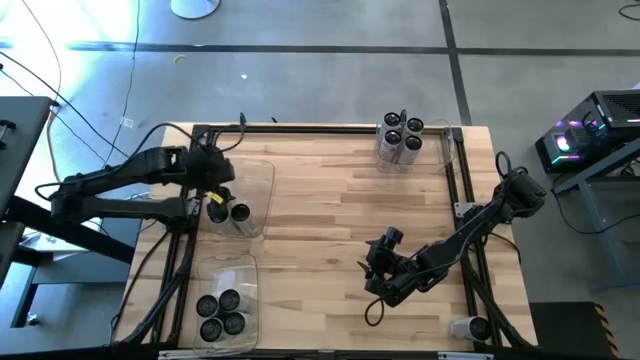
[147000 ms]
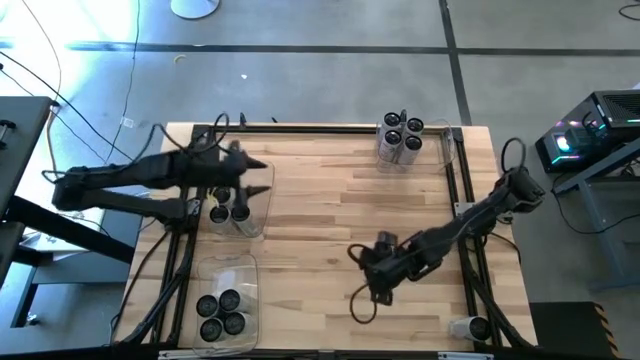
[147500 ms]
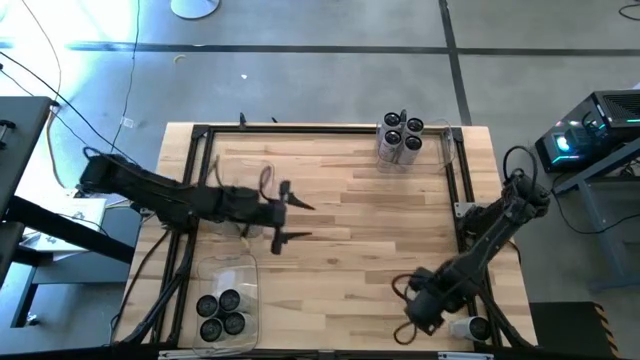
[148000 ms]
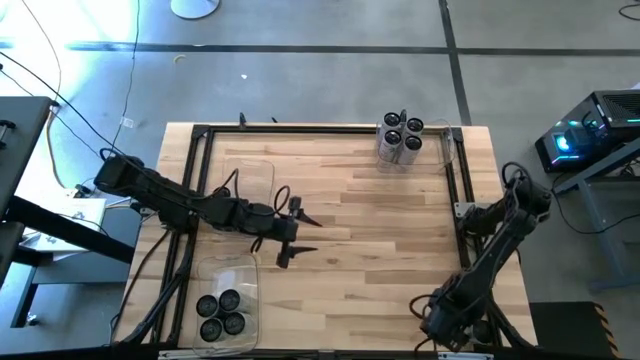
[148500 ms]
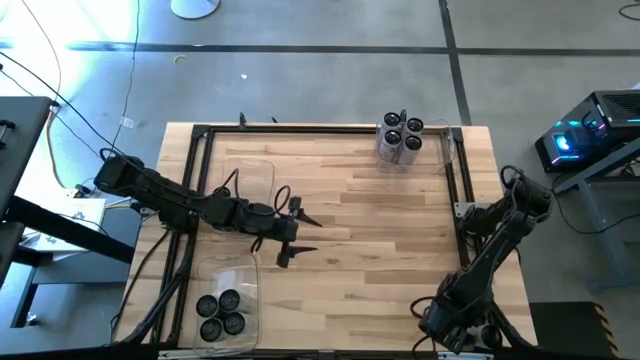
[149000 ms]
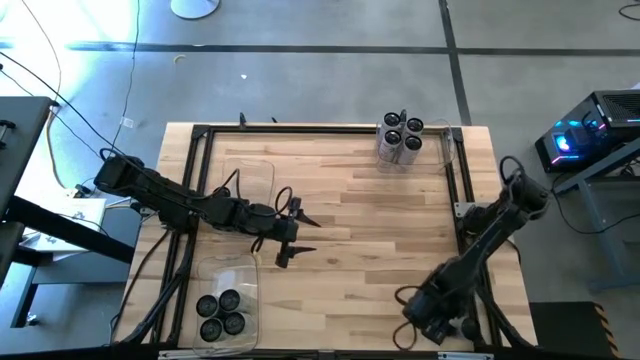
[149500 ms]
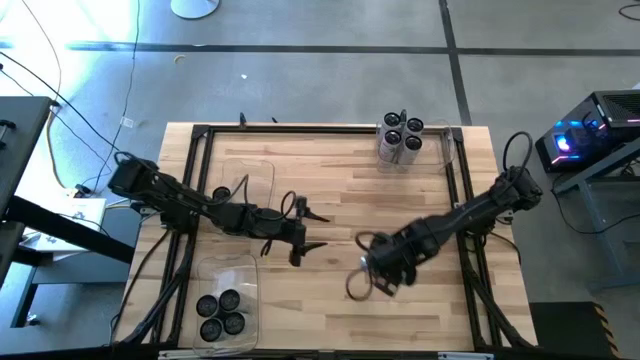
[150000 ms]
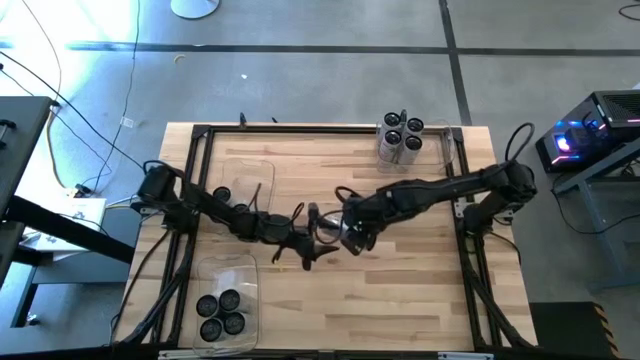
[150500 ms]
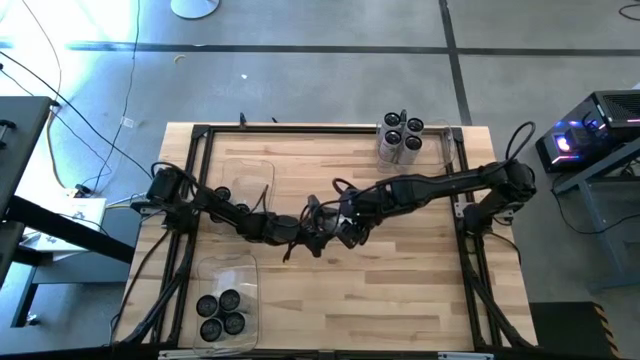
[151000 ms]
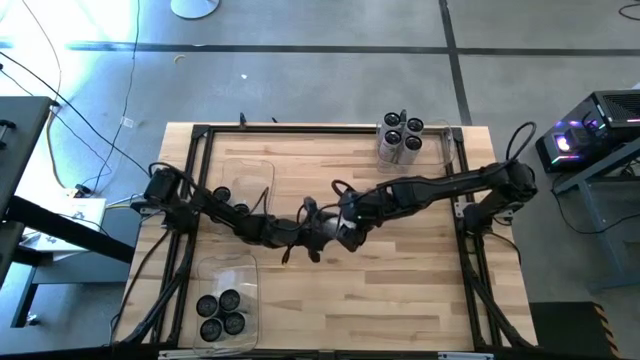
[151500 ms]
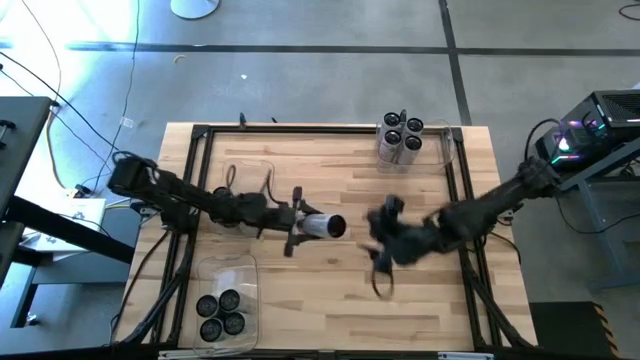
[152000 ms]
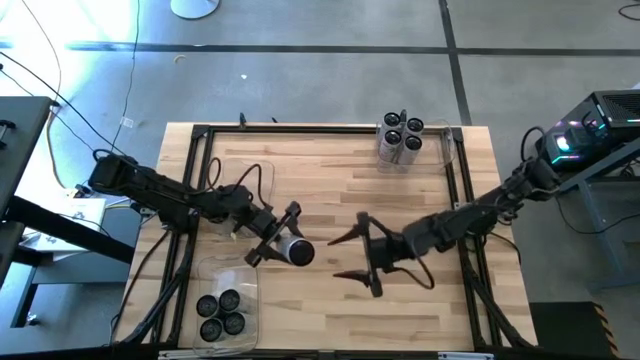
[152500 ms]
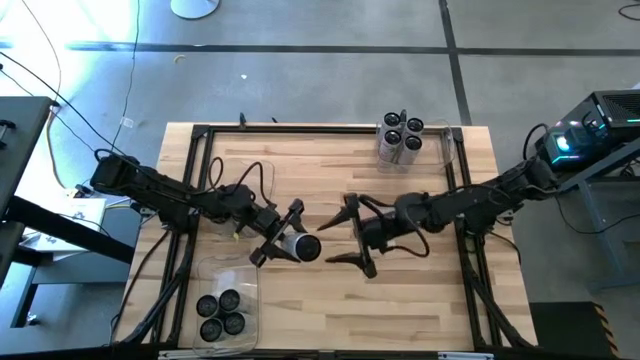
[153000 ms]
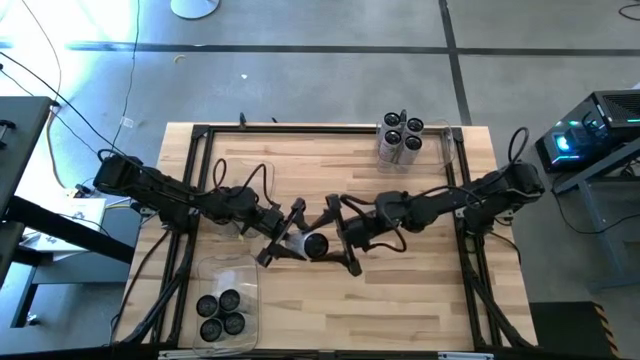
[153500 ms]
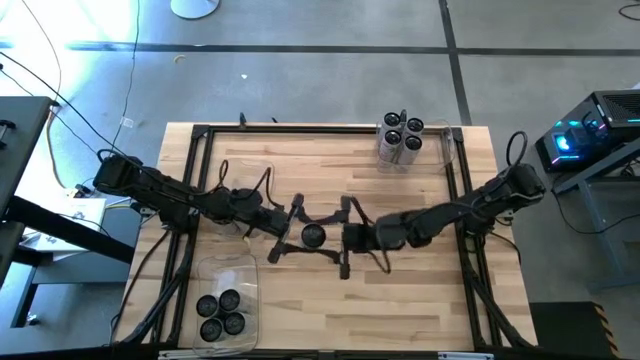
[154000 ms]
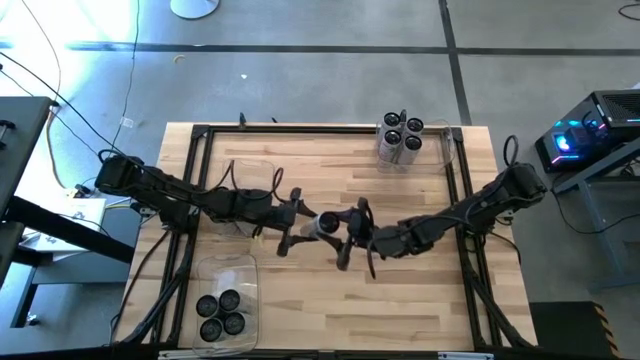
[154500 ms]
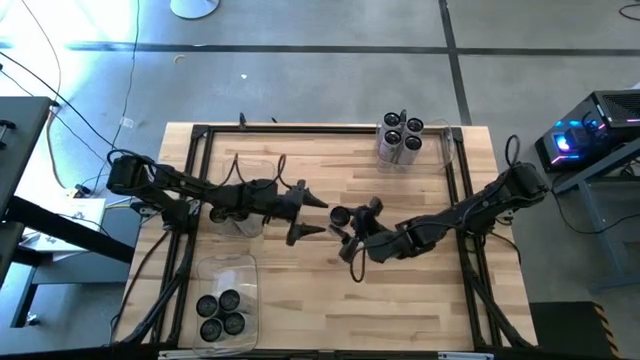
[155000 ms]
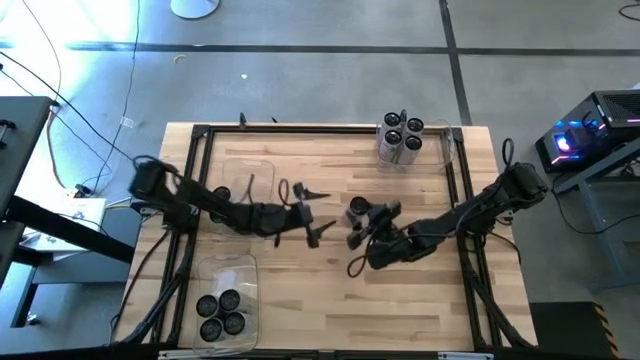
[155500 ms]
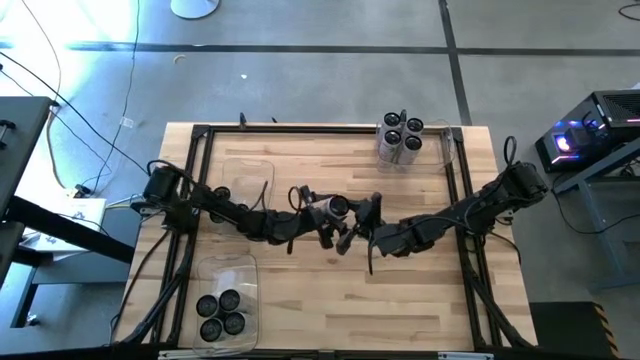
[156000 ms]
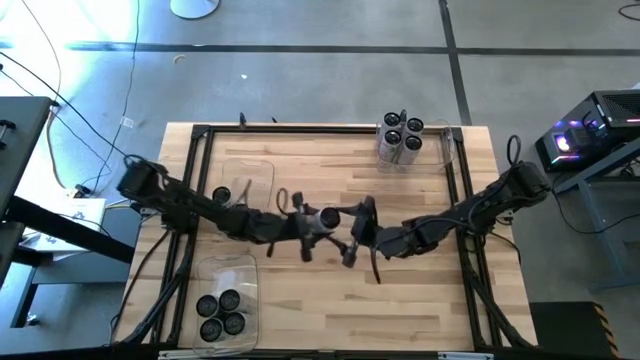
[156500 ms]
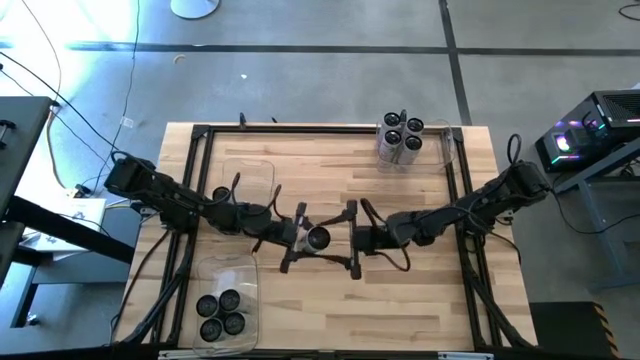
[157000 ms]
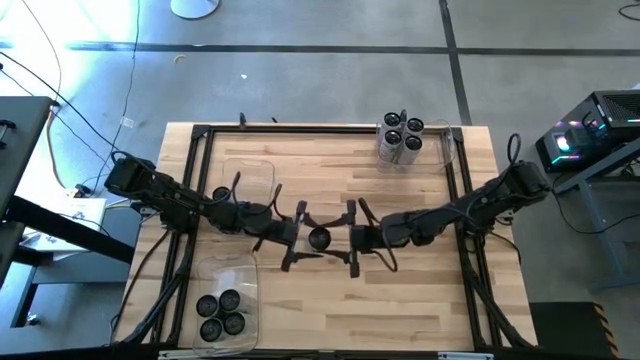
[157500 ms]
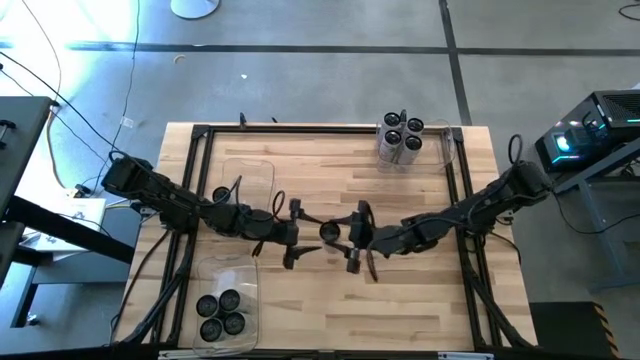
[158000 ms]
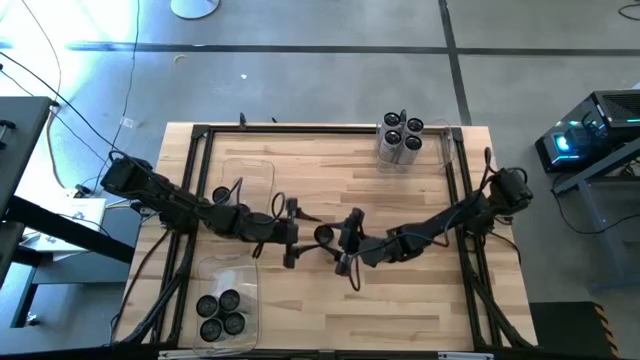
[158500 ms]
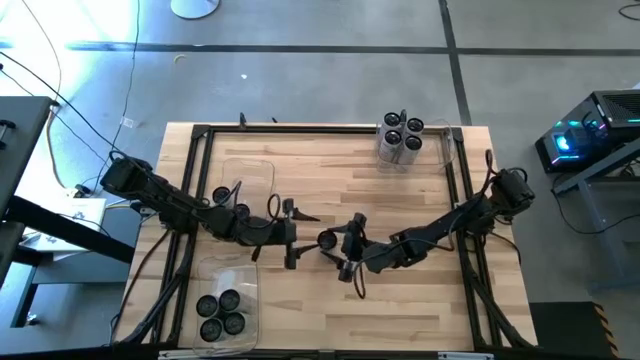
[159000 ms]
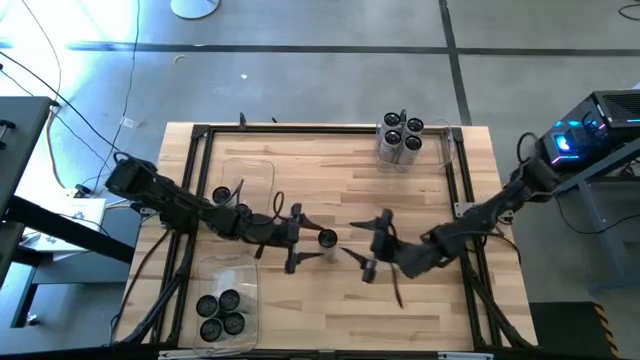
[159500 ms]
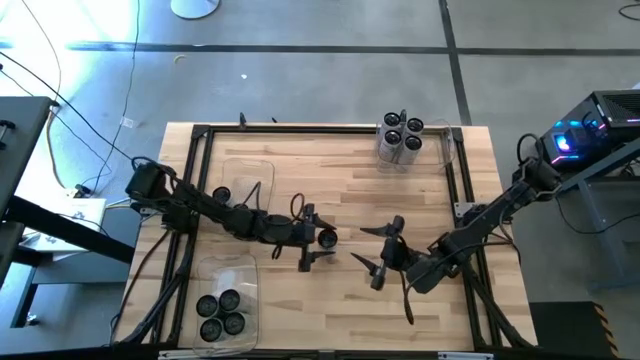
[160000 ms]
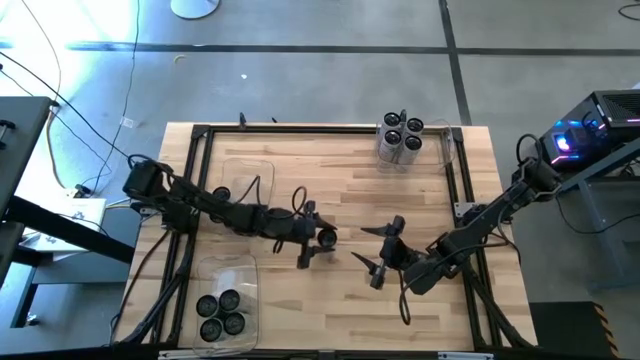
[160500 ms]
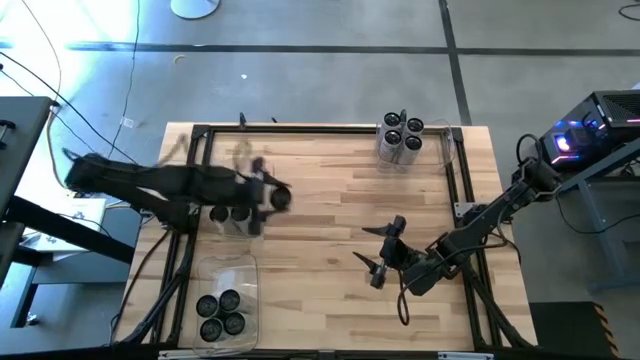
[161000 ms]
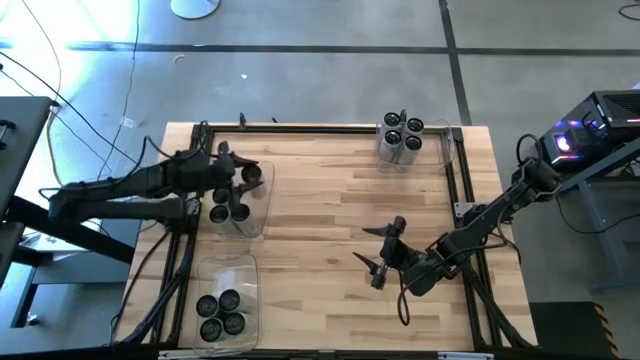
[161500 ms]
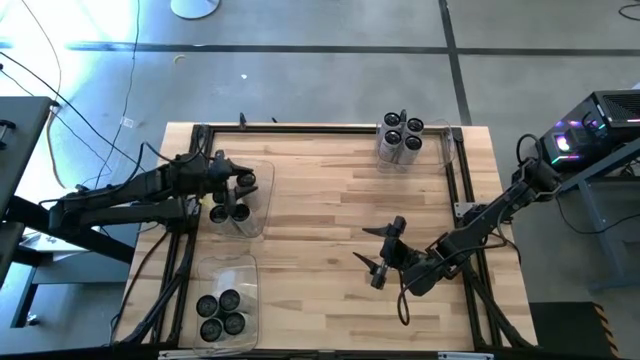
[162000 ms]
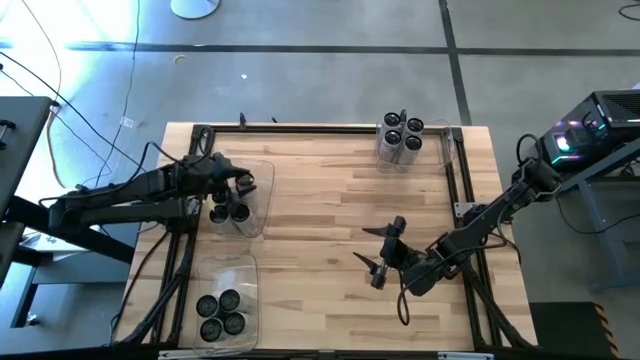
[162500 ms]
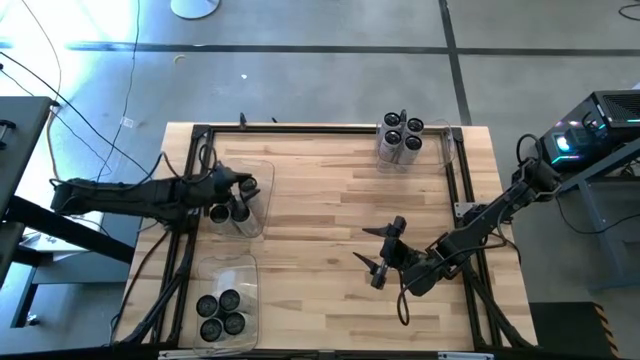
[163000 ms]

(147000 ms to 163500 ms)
Task: Sort soda cans
Put the white yellow soda can into the top left transparent bin

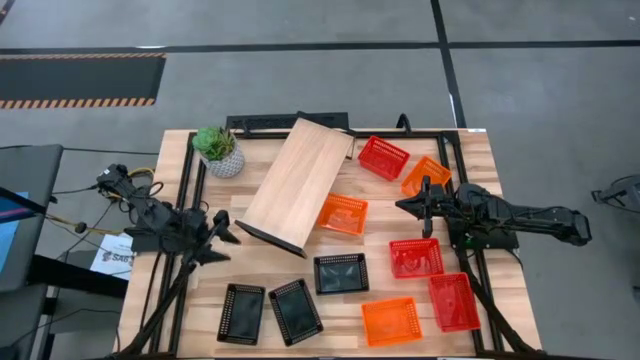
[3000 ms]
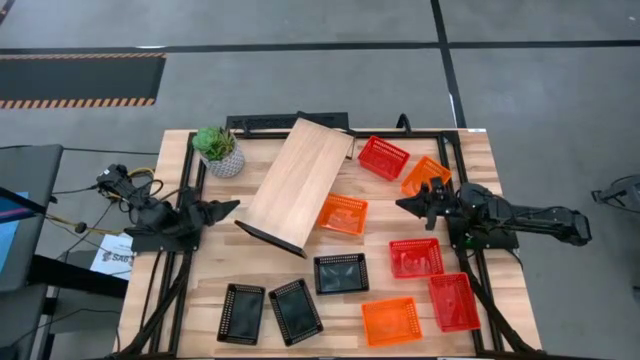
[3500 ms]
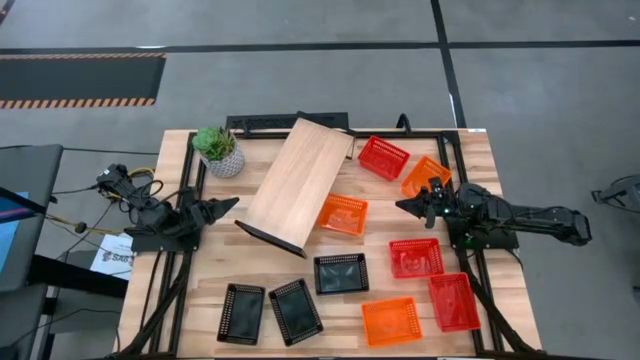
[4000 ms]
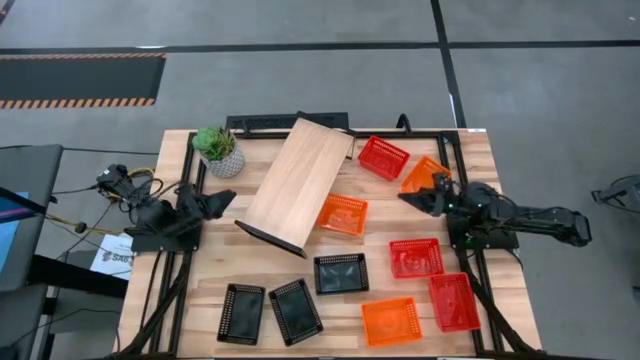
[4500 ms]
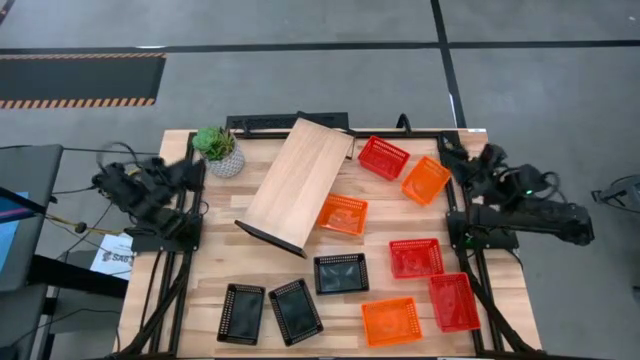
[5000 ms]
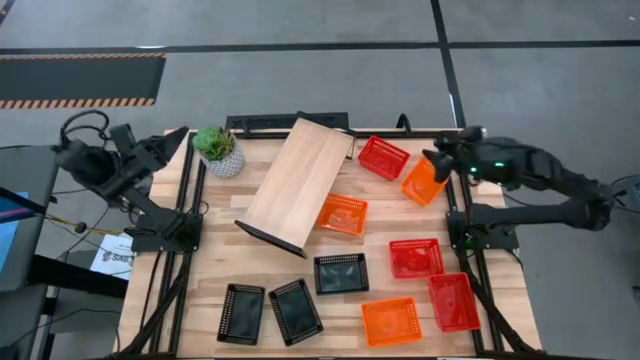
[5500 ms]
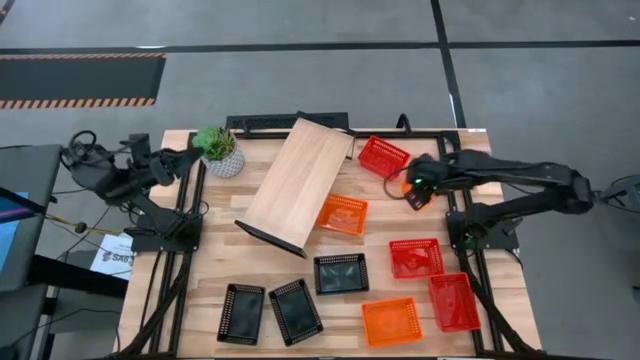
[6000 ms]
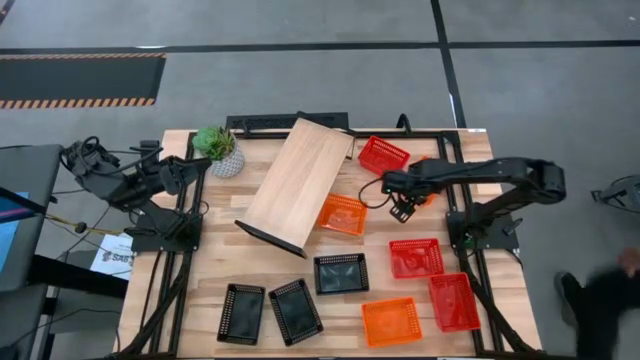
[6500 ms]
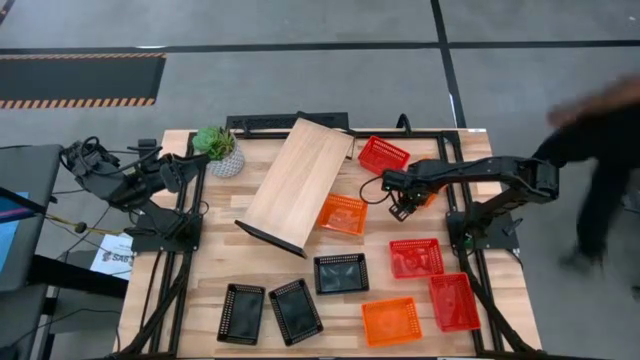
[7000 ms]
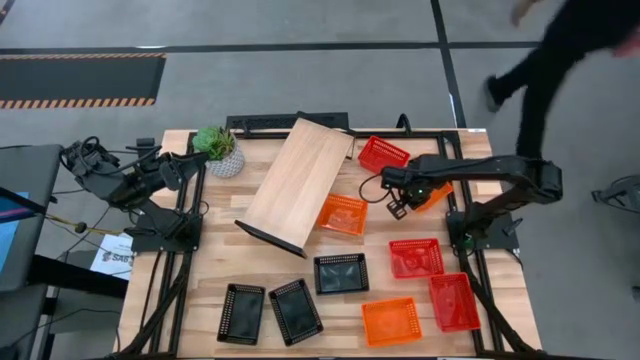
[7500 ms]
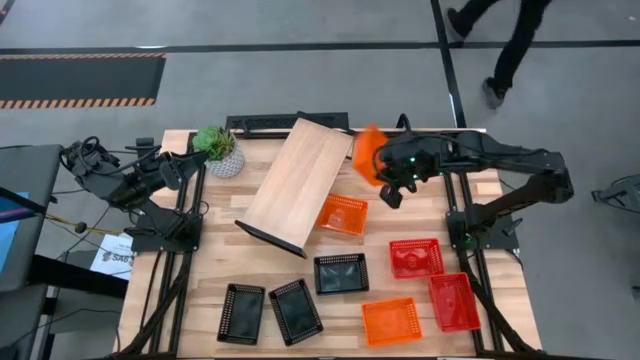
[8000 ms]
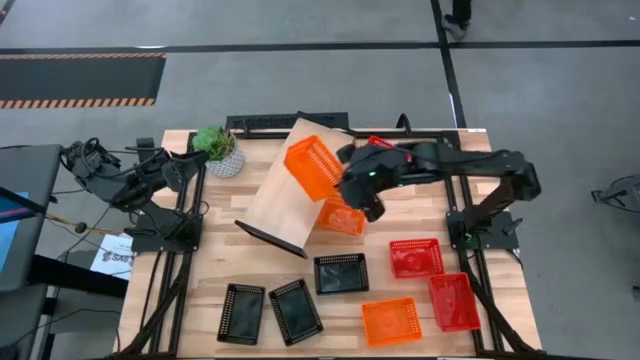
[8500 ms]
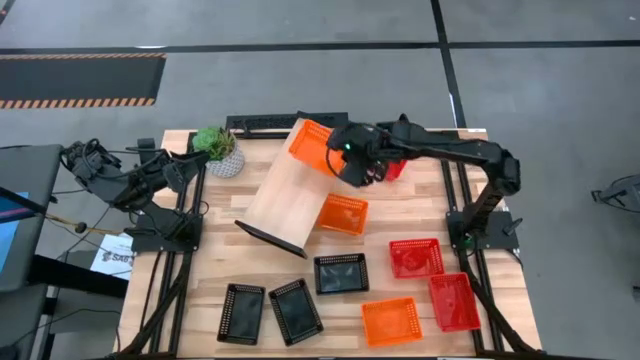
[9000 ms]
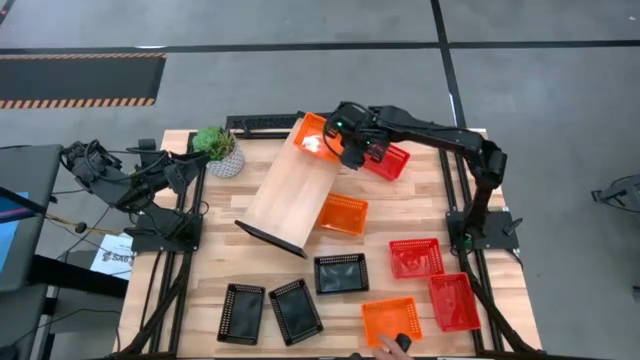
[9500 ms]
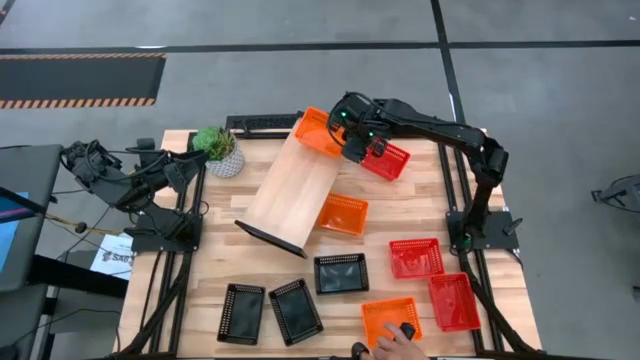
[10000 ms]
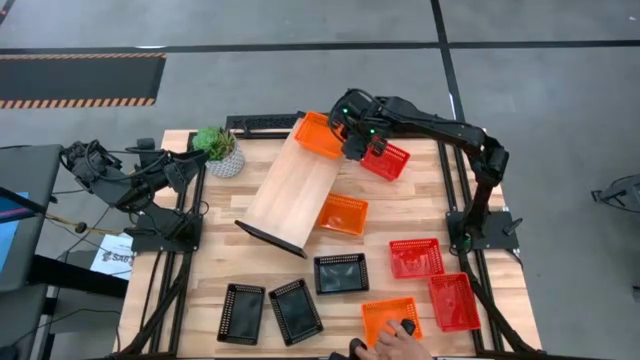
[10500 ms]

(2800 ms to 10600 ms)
Task: Stack baskets on shelf by color
Put the top orange bin on the shelf
